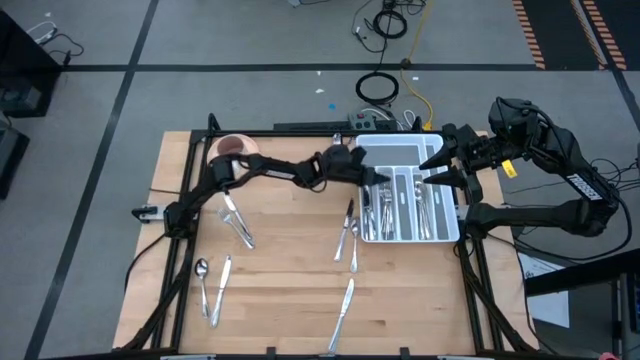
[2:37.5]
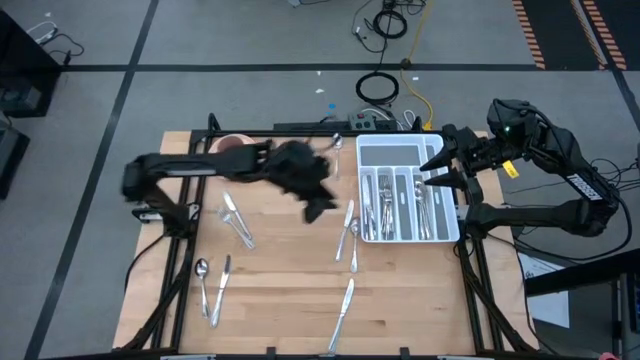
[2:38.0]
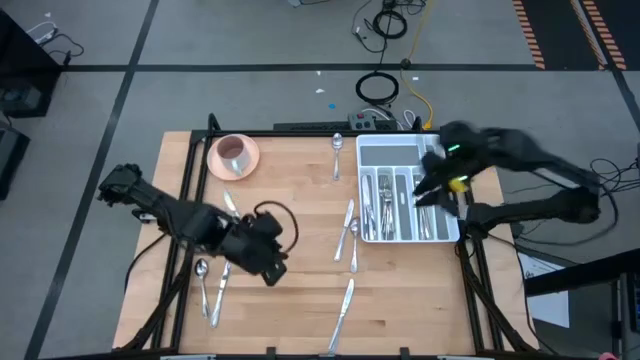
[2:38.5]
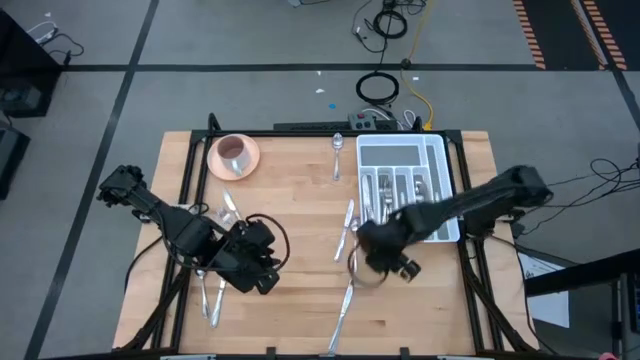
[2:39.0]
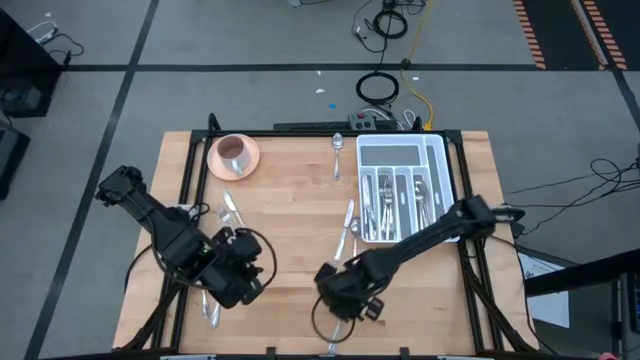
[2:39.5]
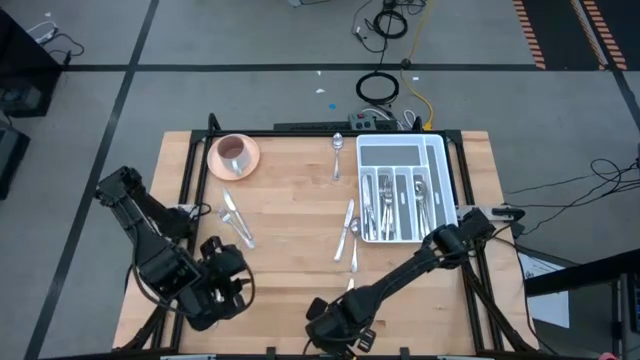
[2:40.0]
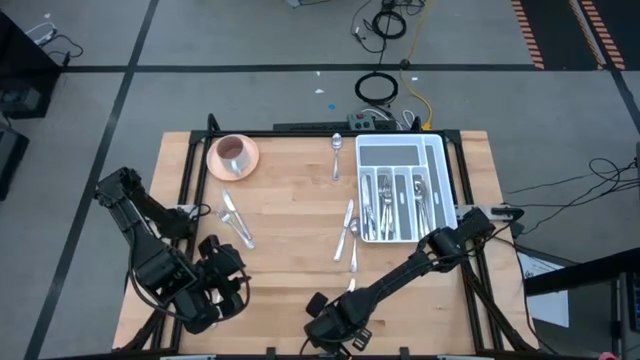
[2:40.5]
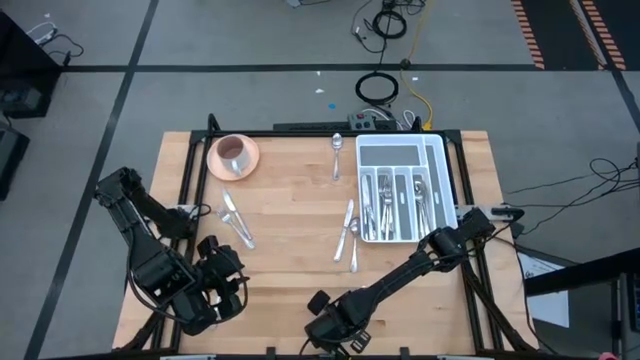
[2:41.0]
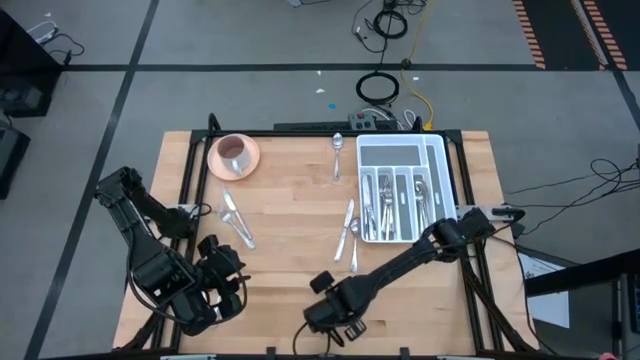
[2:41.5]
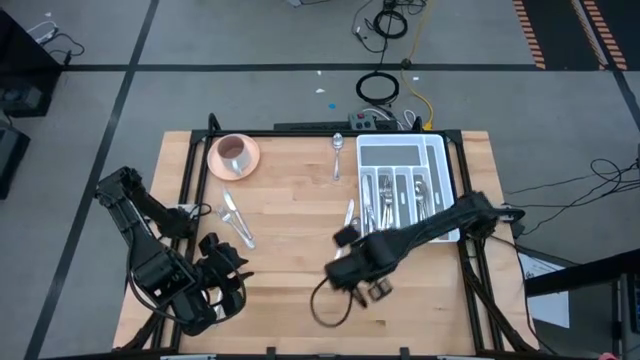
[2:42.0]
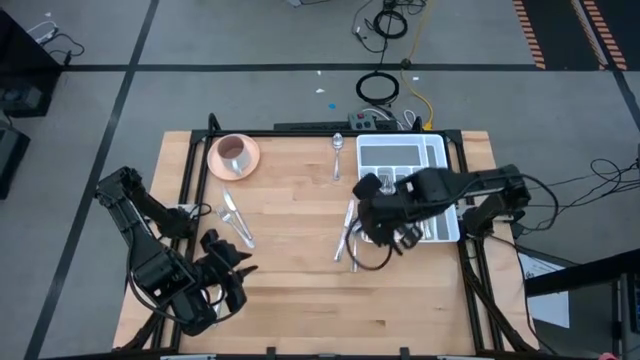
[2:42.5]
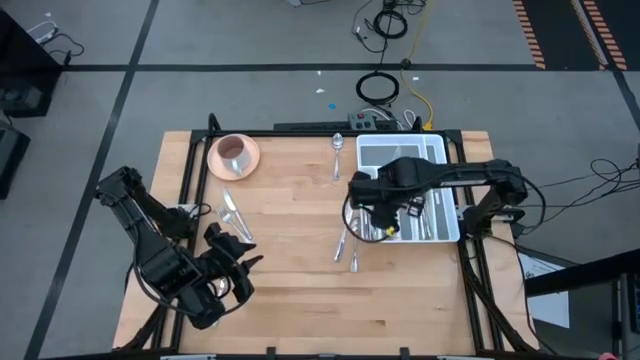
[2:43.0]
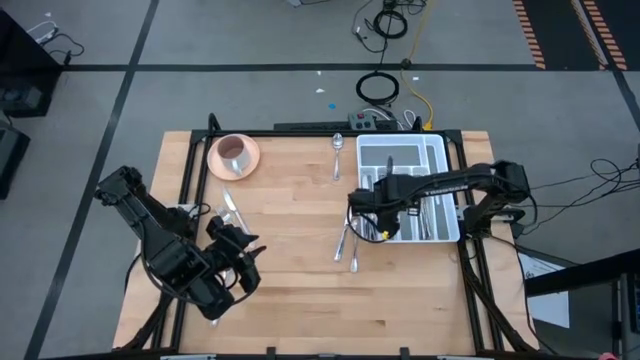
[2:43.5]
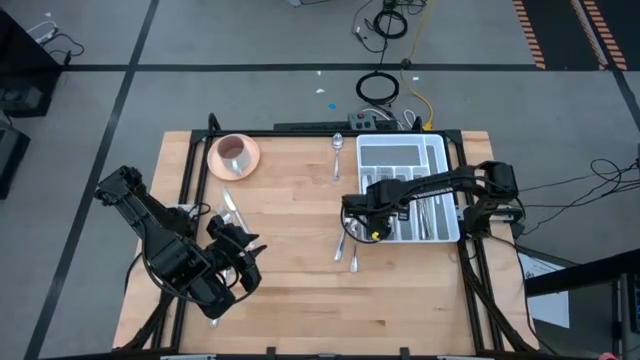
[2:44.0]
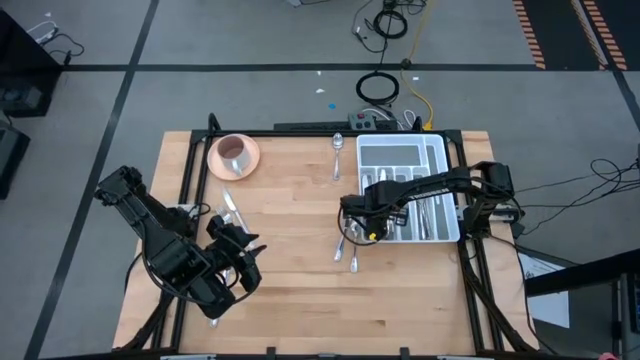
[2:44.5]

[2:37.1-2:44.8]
Task: Sort silverware
Put the silver table knife into the silverware rack

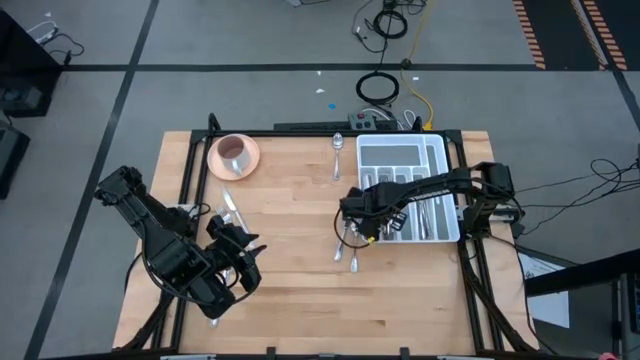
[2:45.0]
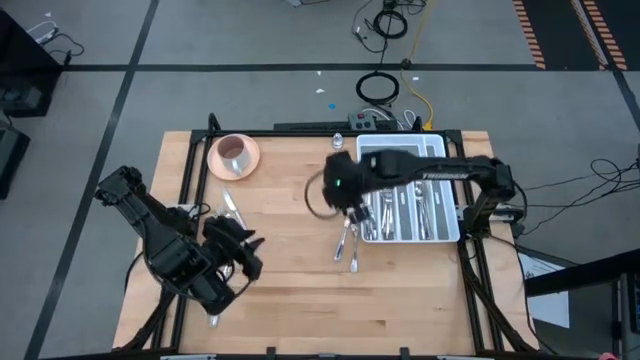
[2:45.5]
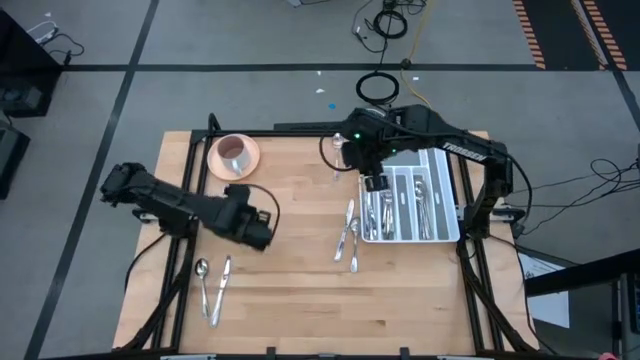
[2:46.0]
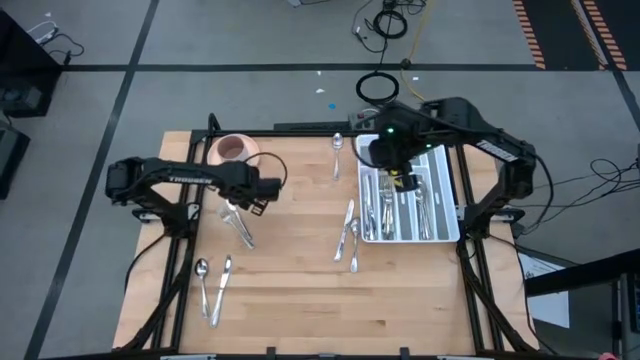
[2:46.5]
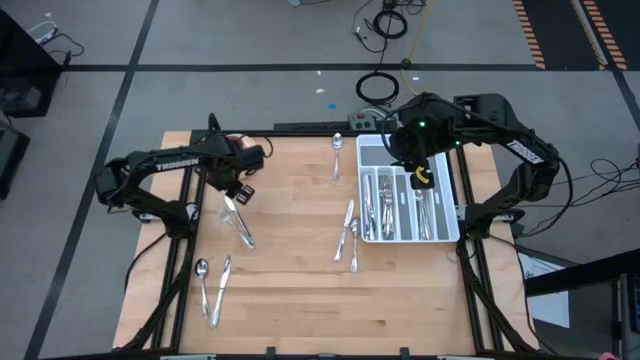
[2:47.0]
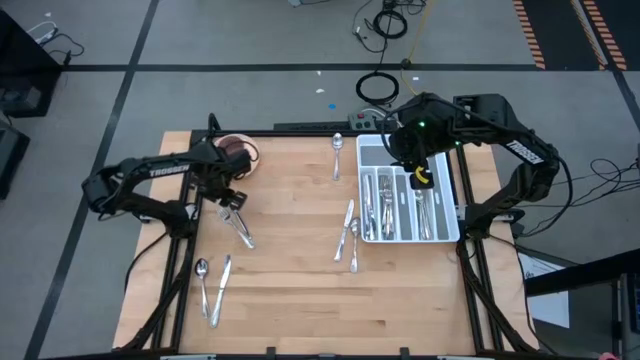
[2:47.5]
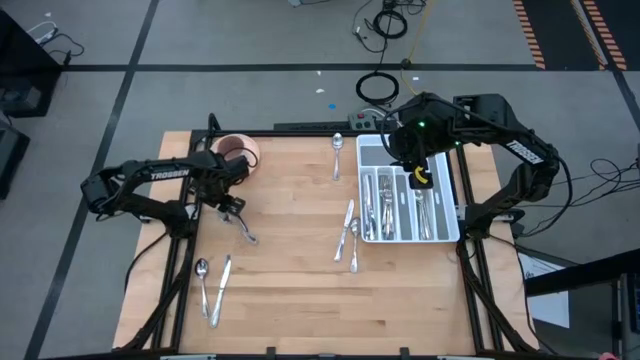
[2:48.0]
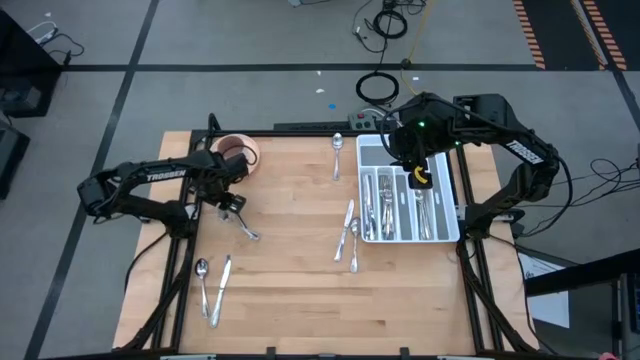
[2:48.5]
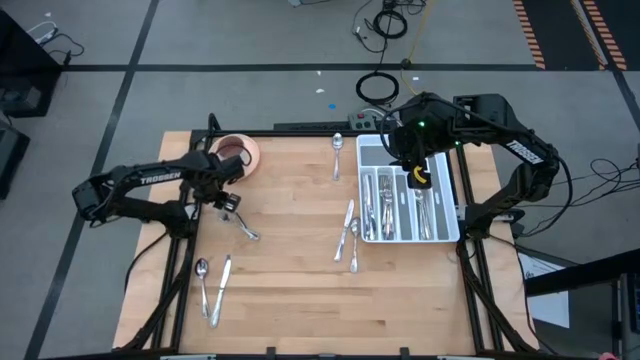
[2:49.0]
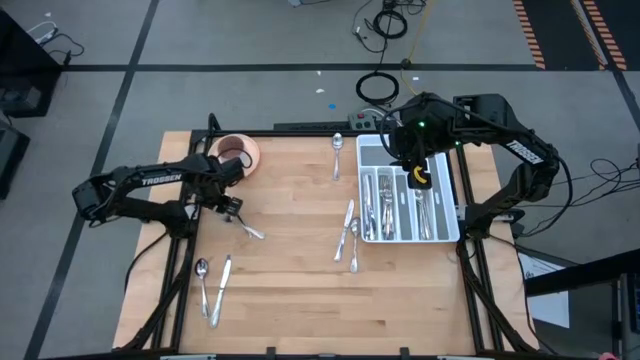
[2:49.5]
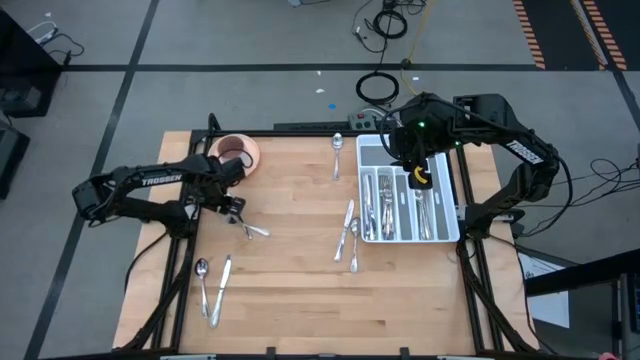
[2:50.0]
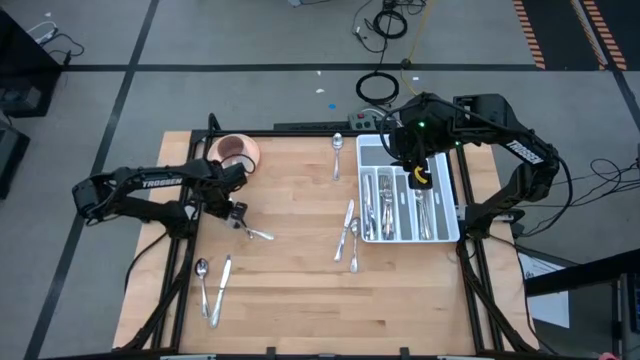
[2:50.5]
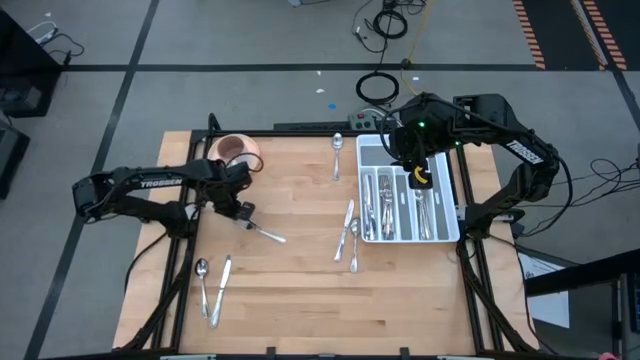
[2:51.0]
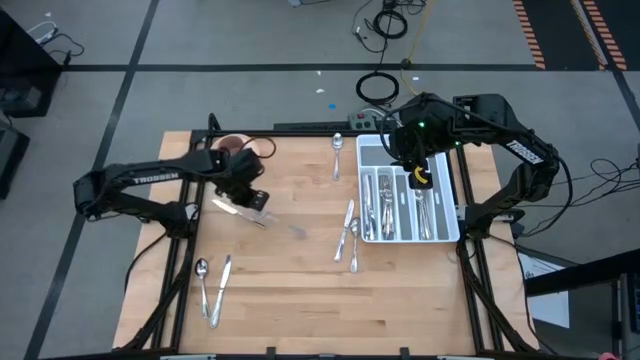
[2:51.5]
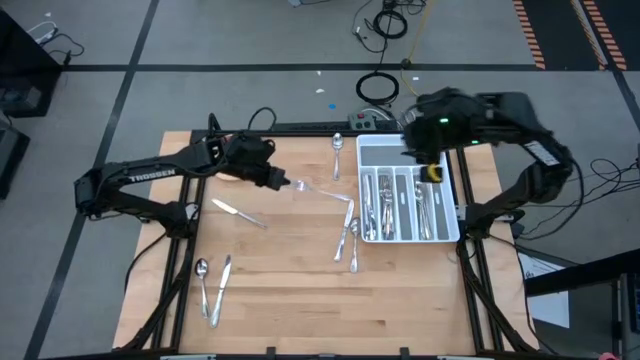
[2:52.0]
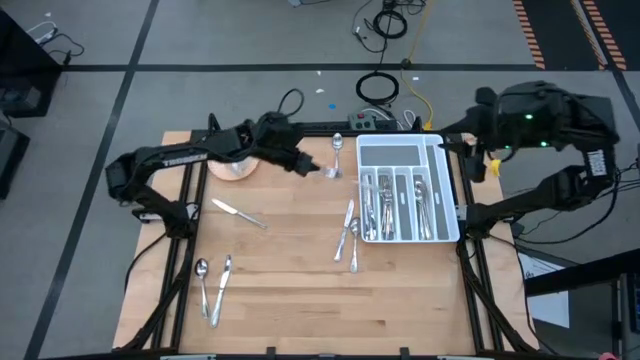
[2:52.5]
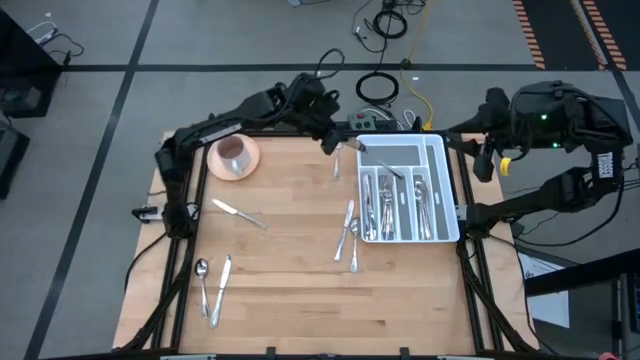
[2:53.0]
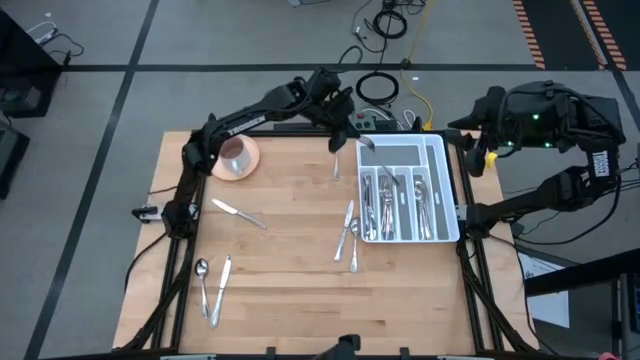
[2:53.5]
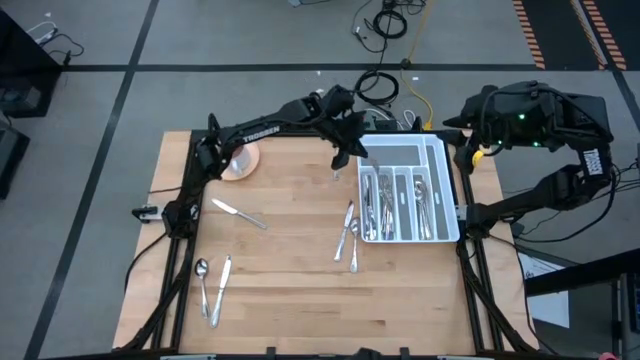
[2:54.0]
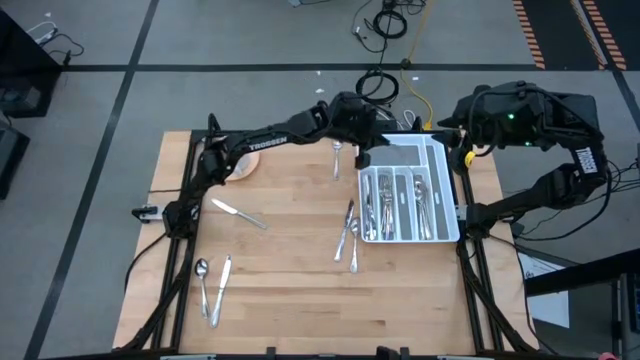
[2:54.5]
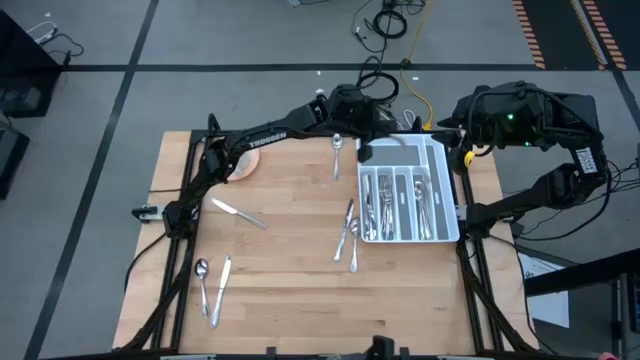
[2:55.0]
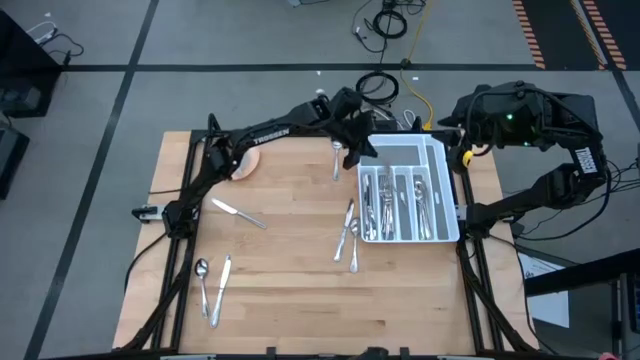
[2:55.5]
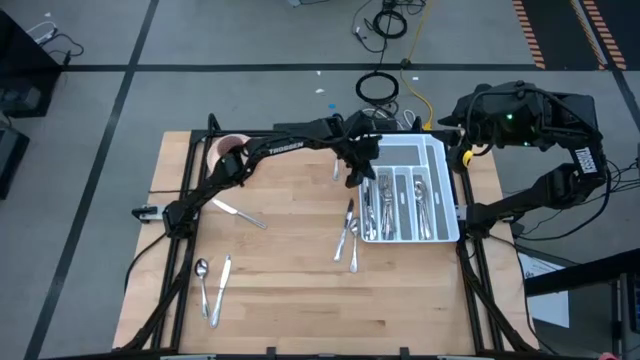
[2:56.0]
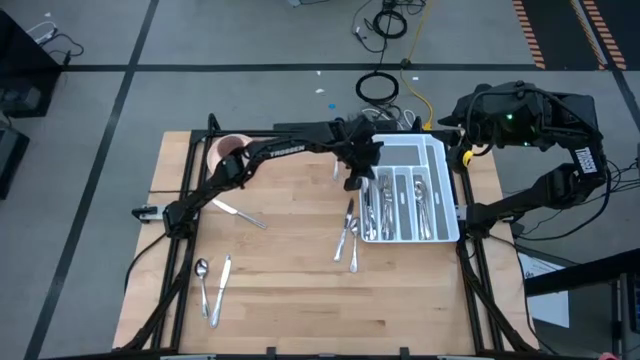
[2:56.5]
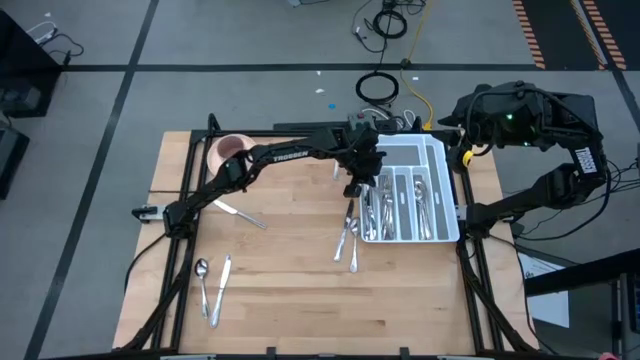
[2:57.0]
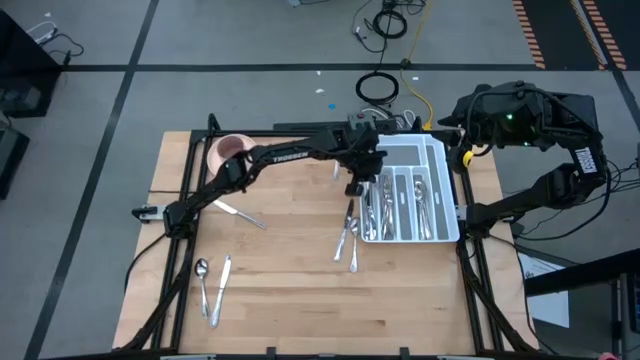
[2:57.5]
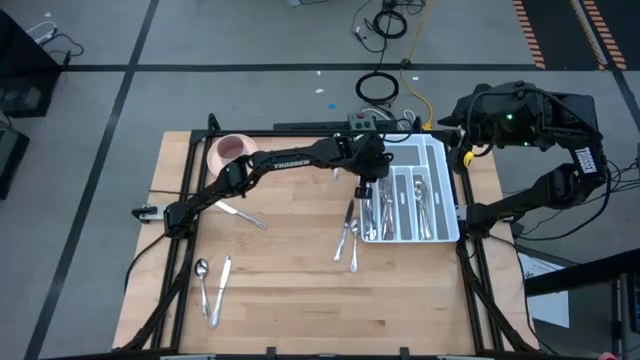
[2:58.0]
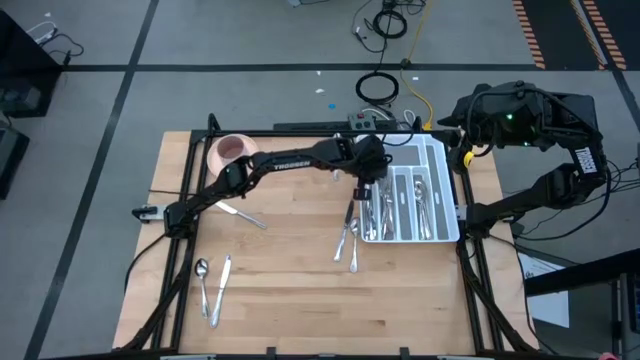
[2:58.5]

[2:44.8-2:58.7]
Put the silver fork into the silverware rack
